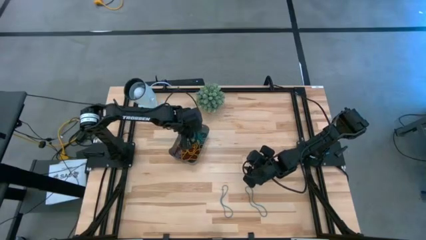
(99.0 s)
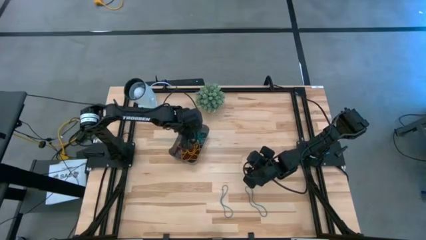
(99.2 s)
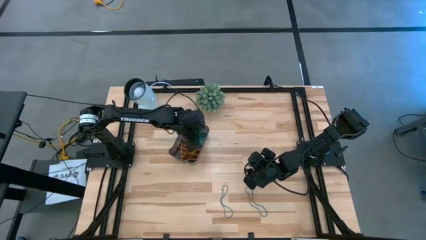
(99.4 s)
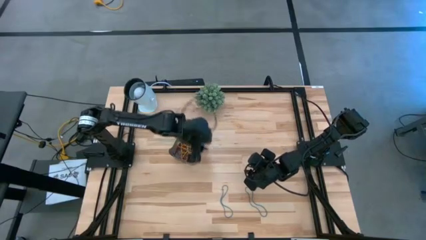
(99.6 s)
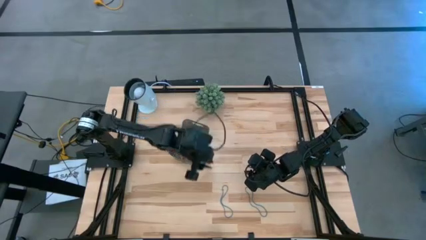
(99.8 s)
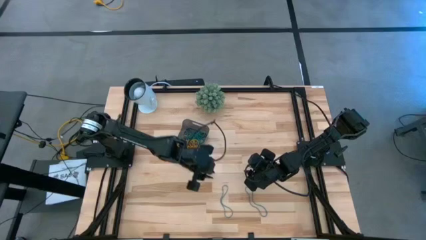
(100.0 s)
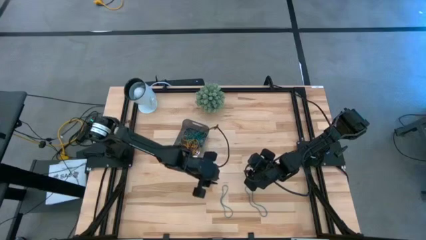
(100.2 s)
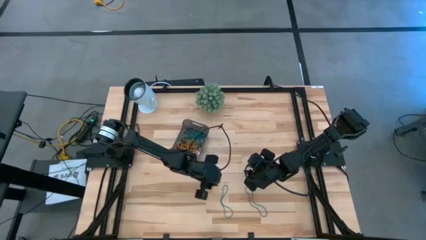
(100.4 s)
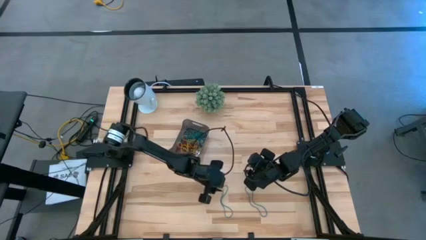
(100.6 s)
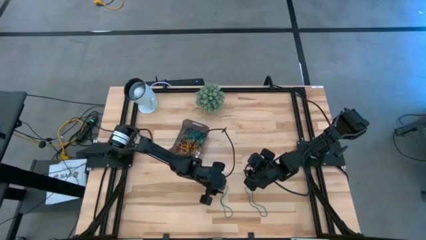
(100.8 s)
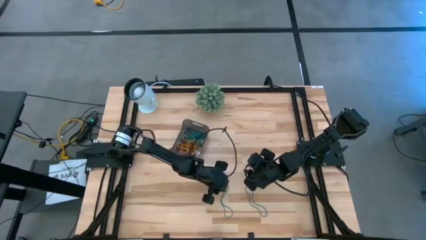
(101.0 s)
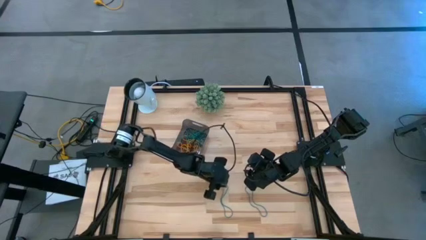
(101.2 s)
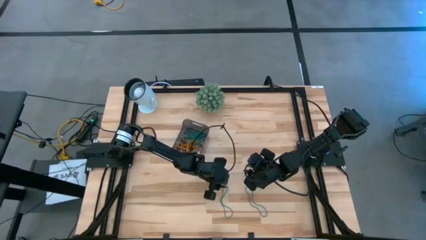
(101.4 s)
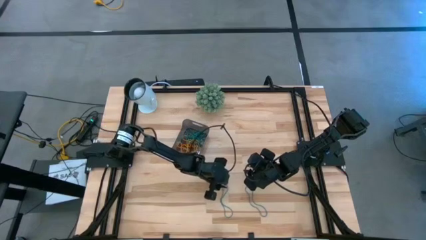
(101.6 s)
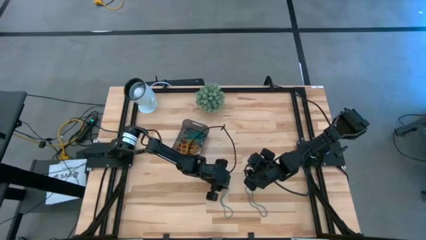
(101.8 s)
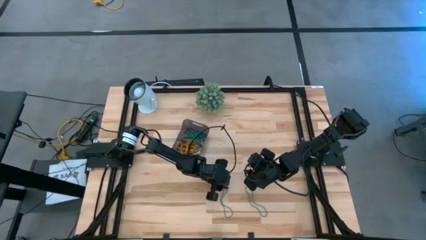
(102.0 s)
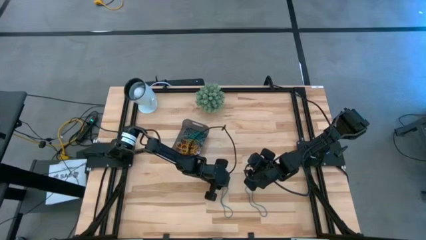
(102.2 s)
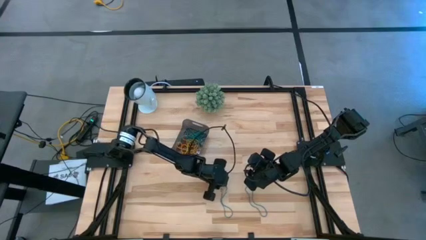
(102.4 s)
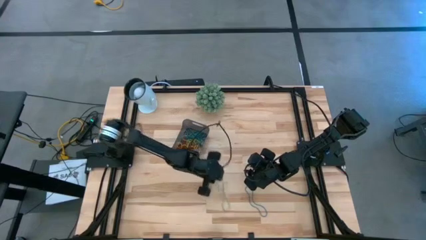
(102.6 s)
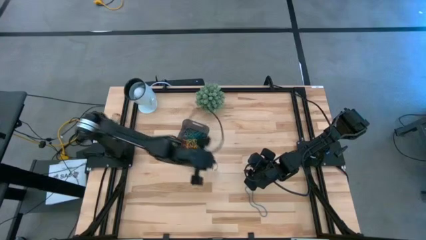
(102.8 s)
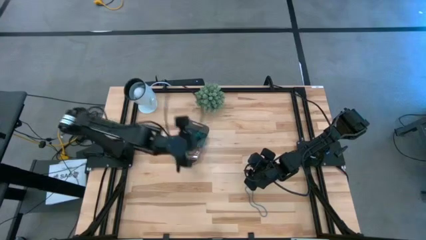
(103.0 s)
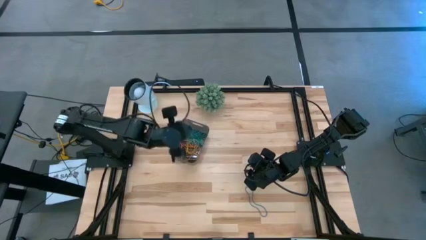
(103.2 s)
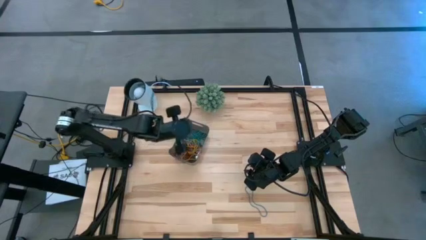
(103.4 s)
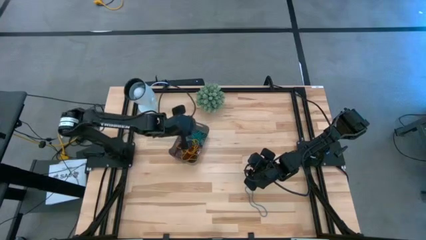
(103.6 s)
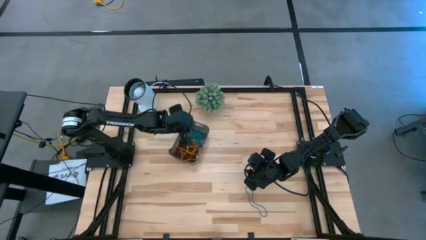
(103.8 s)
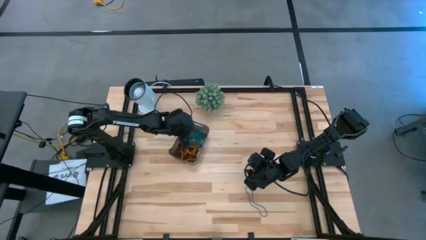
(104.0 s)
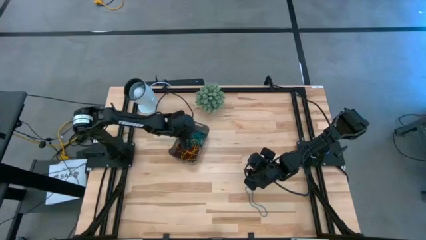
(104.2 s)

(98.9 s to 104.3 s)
Task: Pick and place items into bin
Put the blue rubber band into the black bin

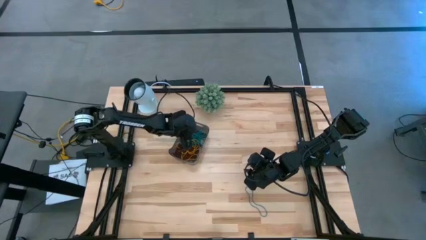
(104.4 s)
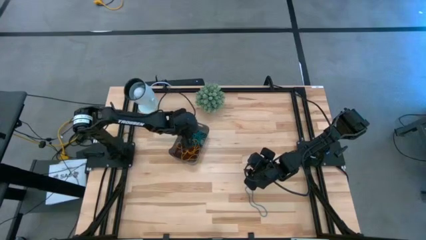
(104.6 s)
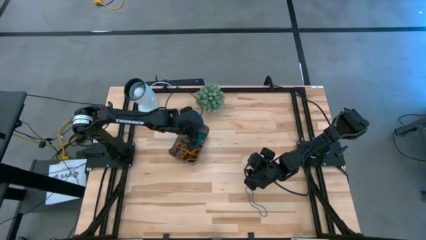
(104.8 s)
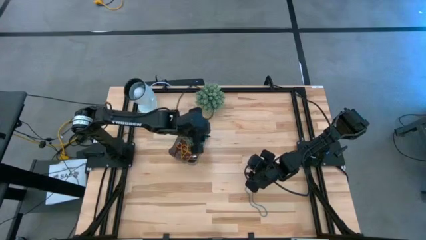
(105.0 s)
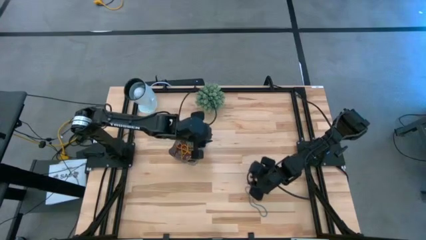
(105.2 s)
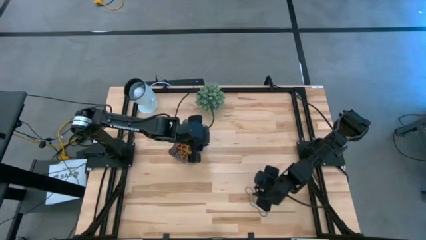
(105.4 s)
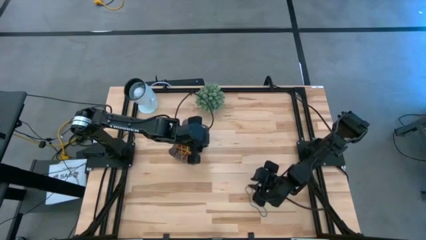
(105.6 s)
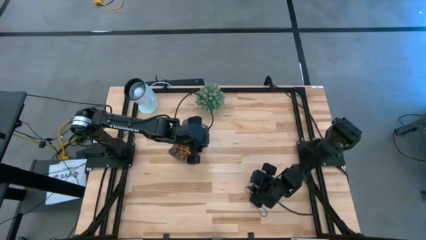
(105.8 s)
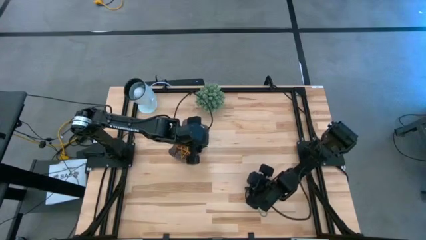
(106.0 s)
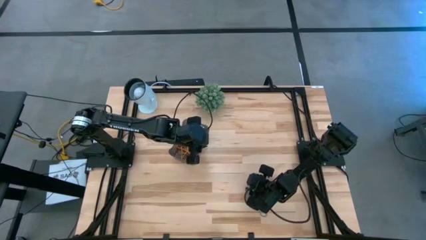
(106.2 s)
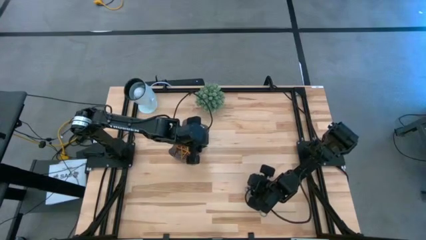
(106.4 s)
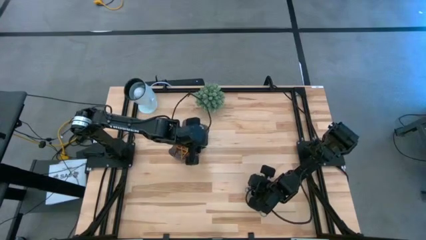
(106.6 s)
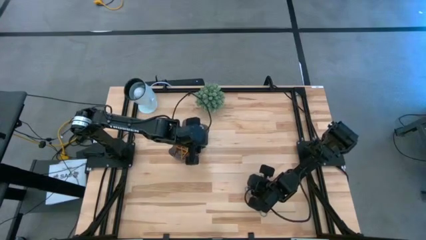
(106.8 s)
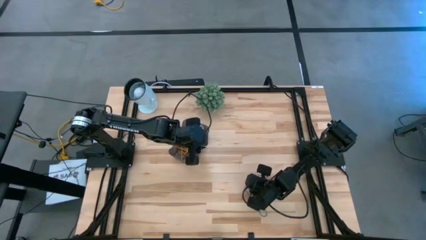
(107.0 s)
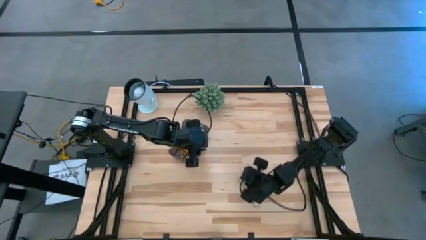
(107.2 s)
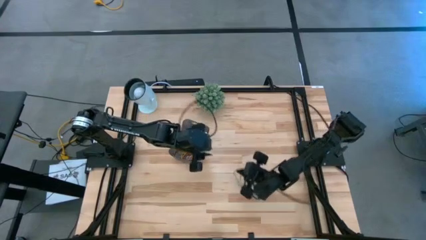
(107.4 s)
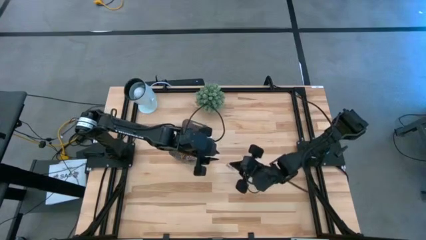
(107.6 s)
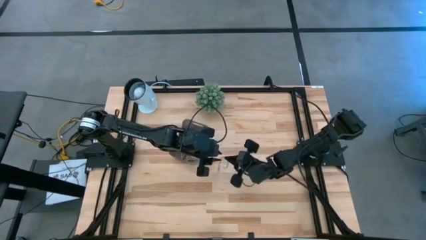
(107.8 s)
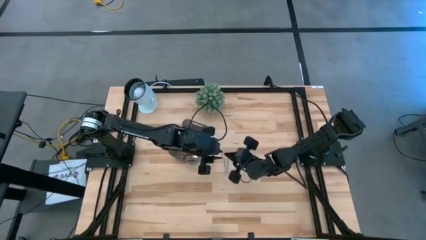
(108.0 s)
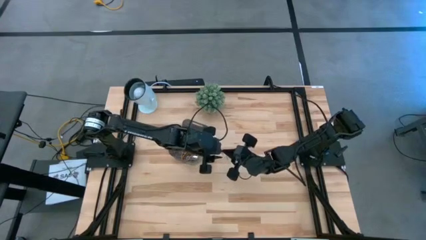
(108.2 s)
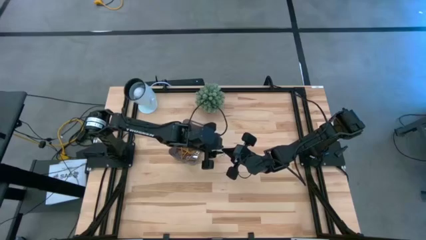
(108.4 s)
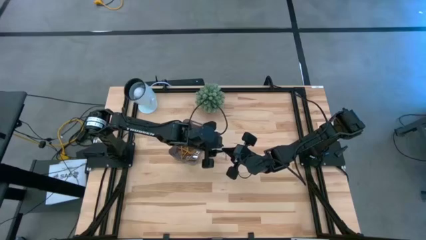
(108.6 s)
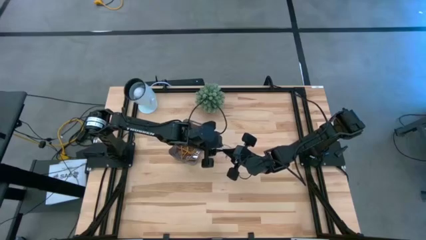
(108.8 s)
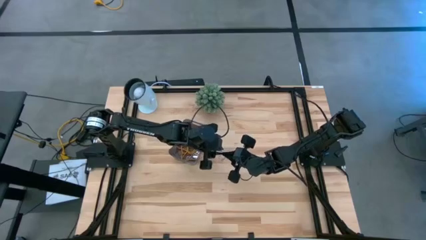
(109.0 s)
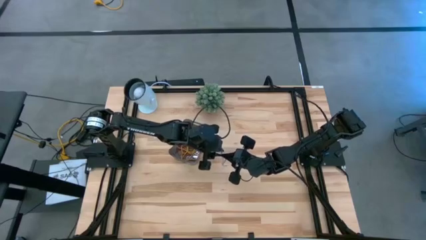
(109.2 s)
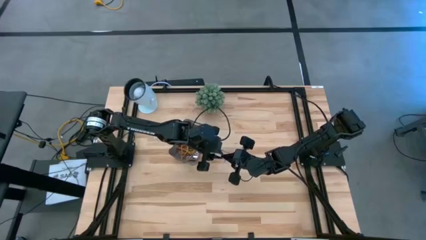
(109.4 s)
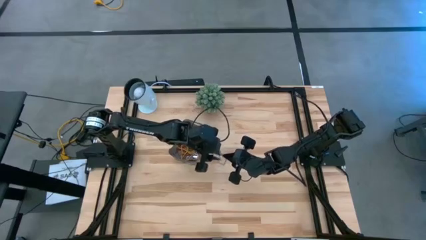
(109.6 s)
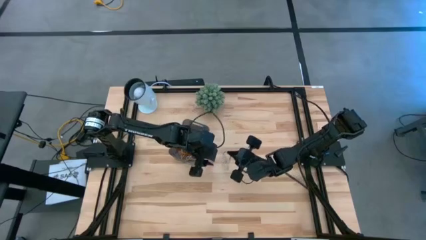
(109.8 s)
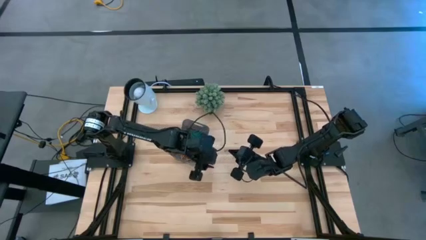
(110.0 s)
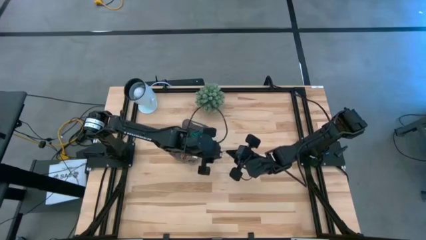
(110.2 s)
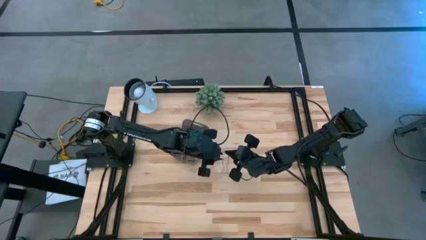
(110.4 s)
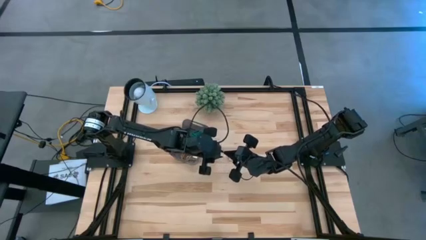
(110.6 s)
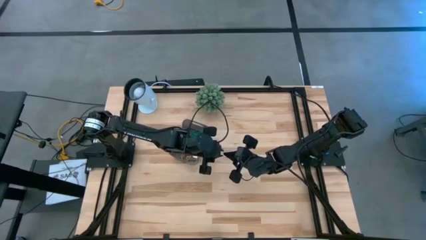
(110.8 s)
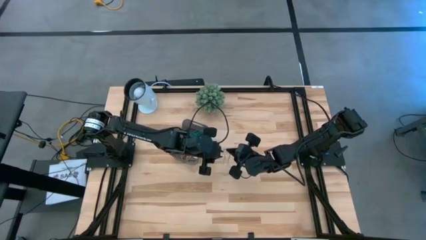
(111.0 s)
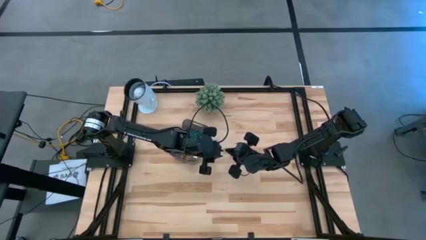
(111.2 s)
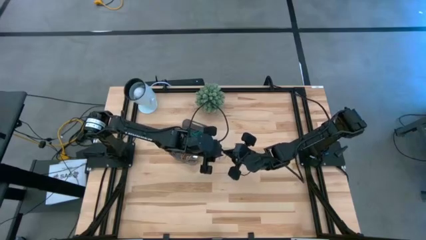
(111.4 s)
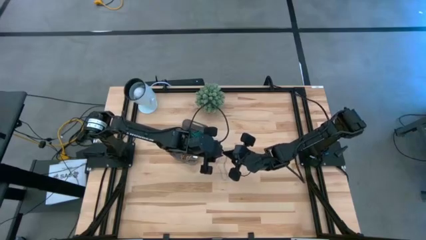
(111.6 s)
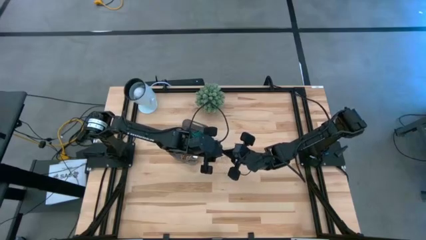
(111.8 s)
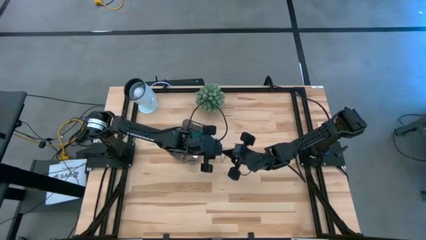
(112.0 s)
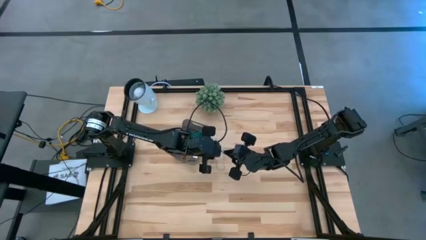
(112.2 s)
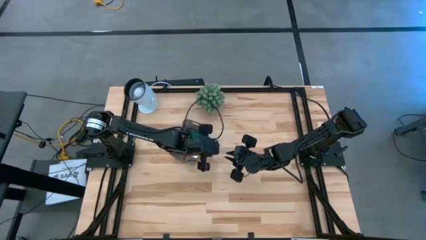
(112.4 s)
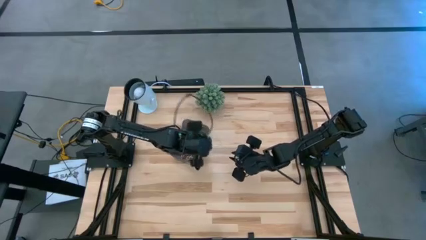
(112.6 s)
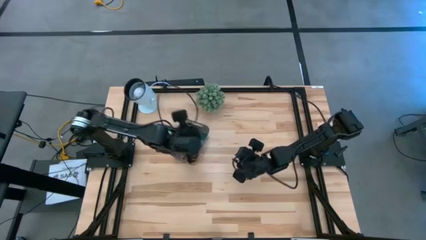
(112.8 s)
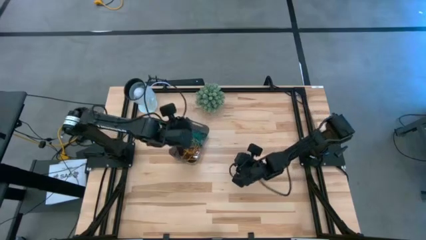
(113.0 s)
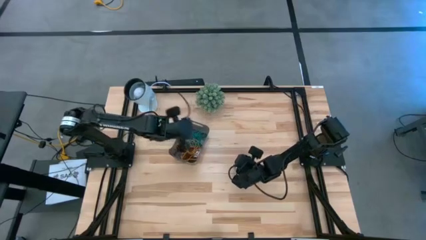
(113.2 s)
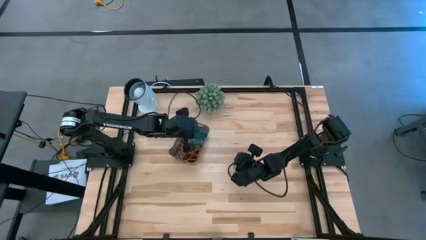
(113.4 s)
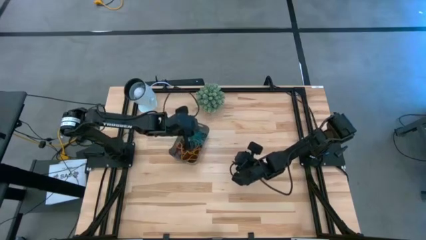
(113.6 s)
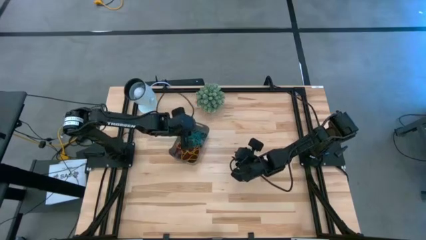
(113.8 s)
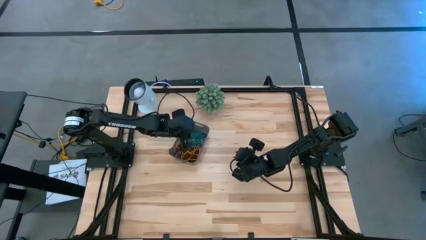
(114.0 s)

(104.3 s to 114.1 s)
Put the blue rubber band into the black bin

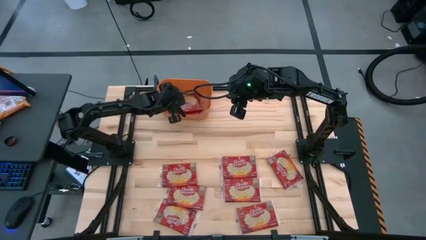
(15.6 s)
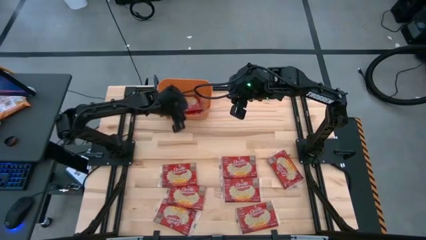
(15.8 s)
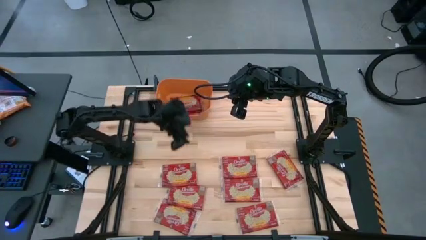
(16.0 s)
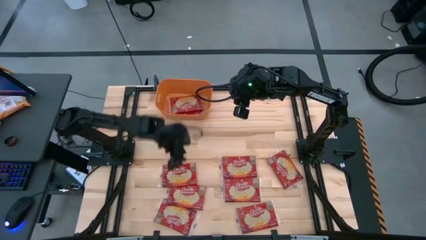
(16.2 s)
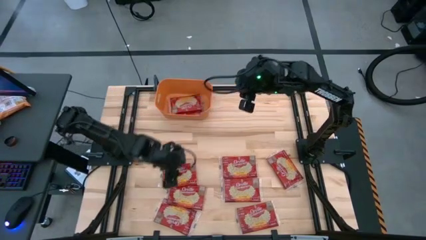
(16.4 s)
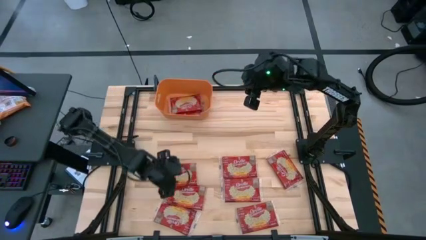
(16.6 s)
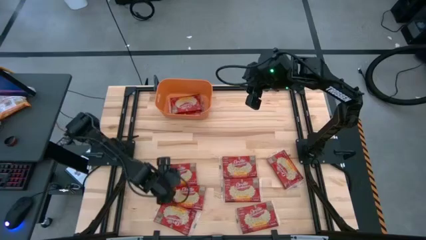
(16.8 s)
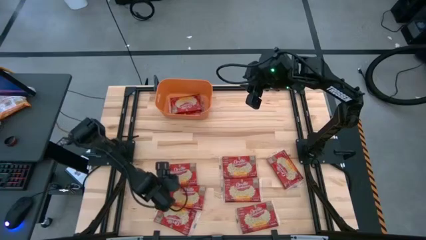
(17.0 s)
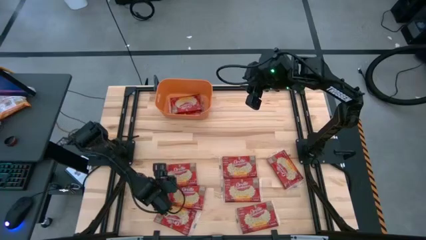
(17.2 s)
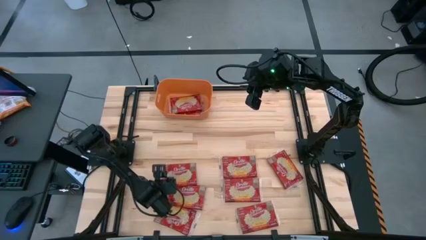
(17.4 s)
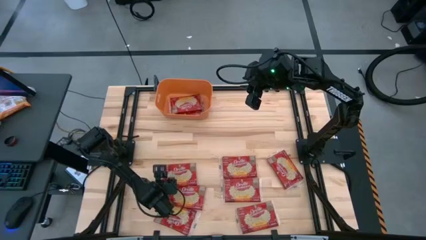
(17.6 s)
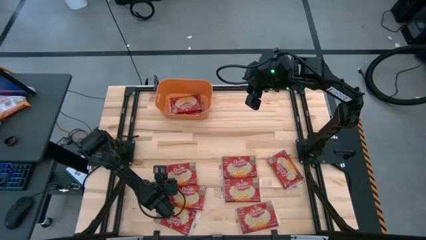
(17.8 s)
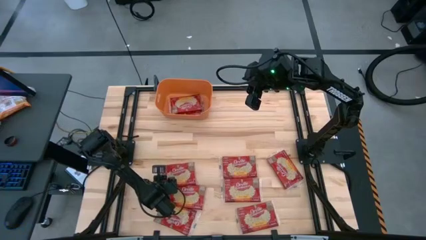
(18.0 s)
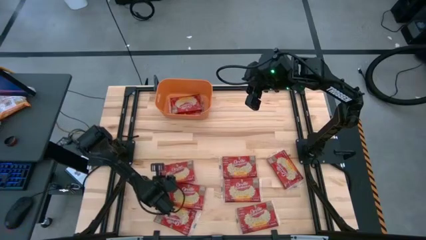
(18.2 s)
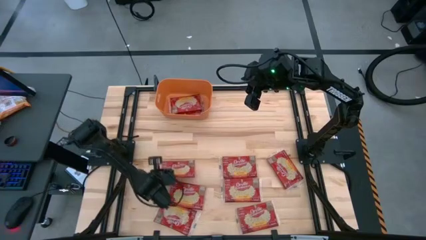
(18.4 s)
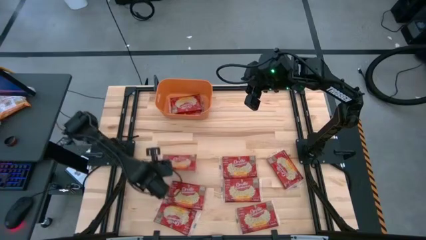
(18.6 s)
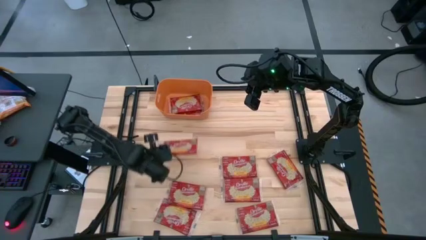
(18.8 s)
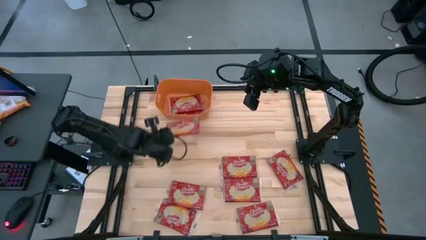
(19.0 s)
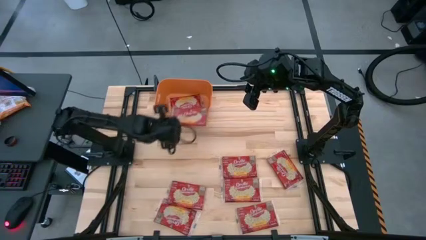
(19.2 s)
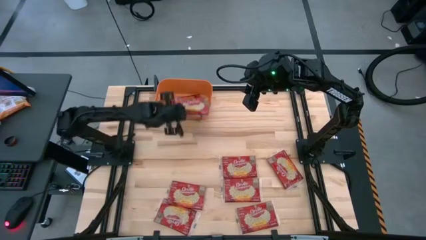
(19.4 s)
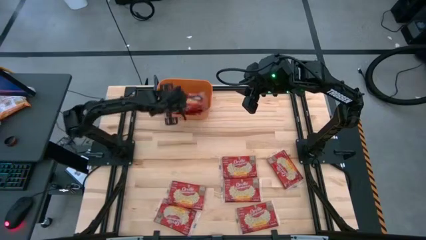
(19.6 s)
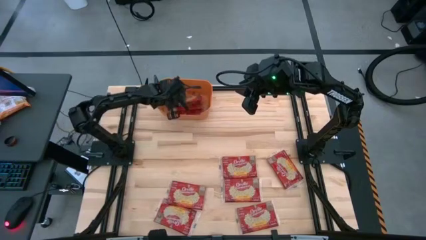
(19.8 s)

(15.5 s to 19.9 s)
Task: Sort popcorn bags into baskets
Put the red popcorn bag into the orange bin
